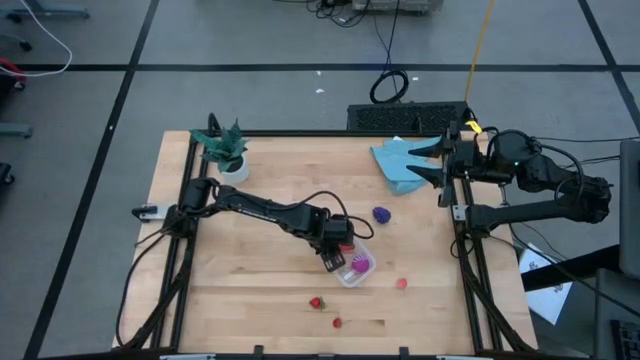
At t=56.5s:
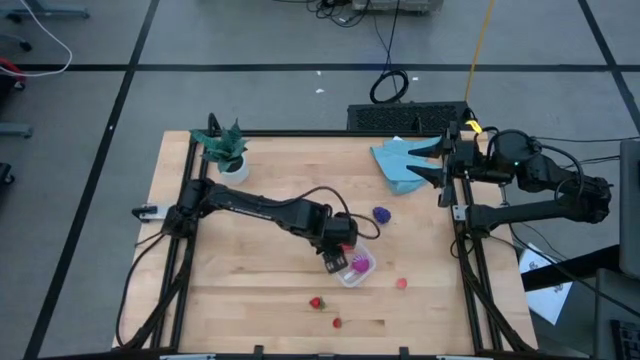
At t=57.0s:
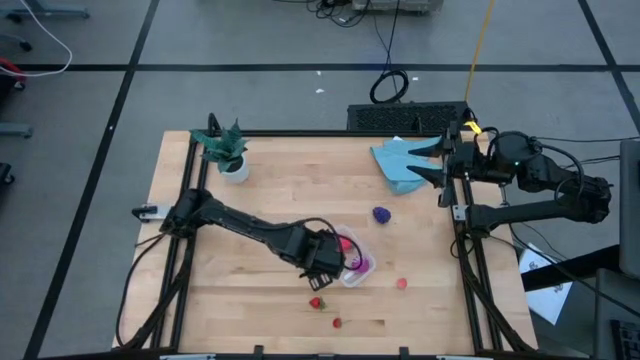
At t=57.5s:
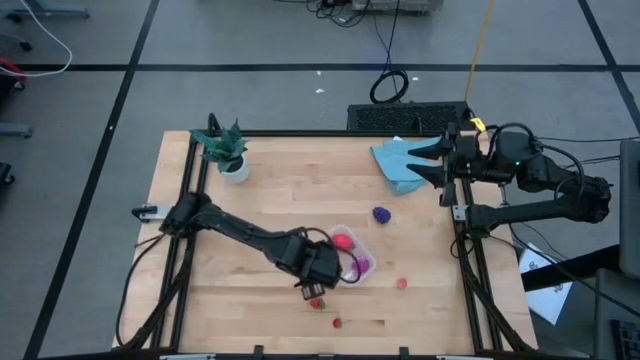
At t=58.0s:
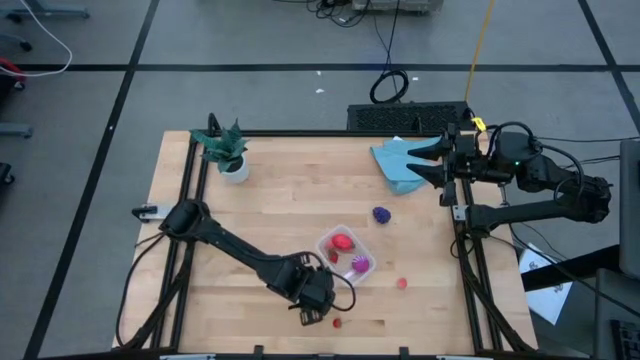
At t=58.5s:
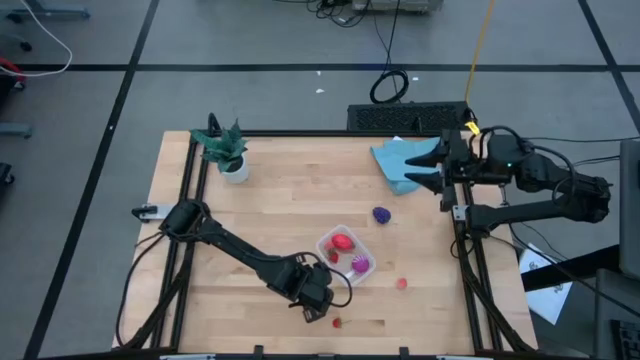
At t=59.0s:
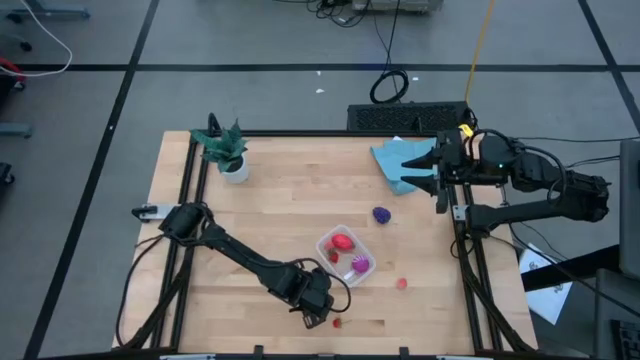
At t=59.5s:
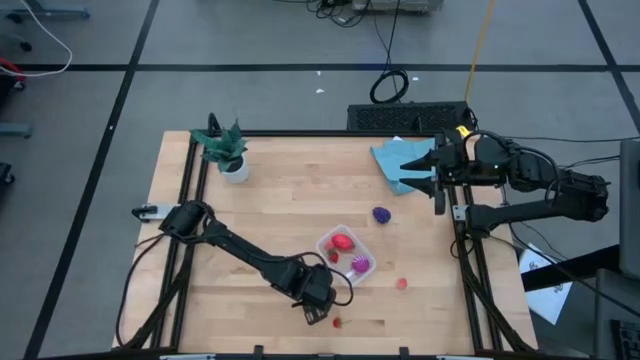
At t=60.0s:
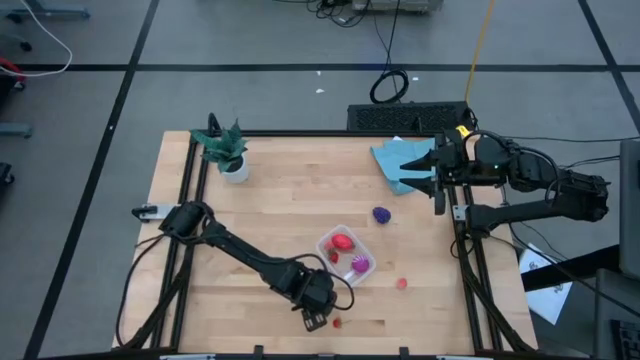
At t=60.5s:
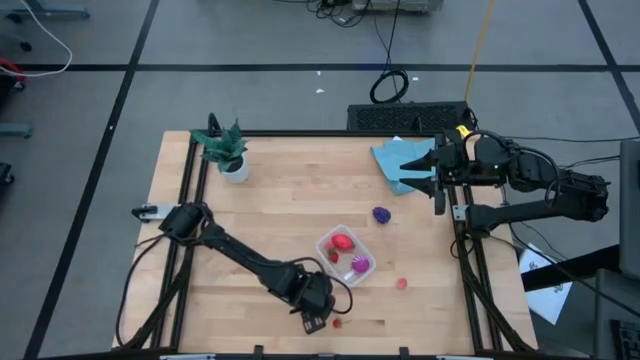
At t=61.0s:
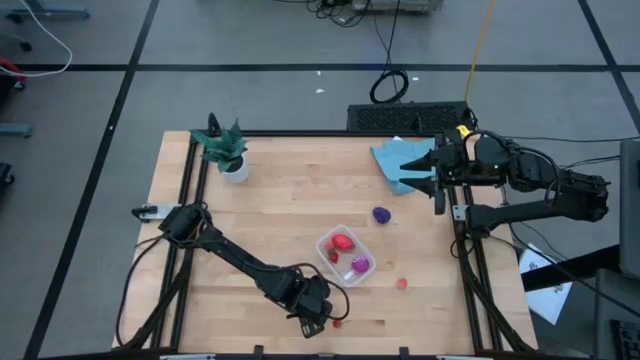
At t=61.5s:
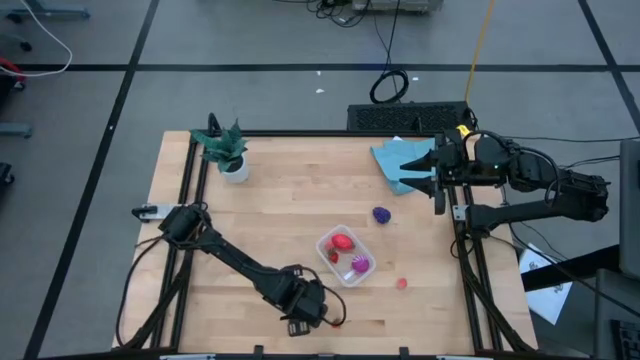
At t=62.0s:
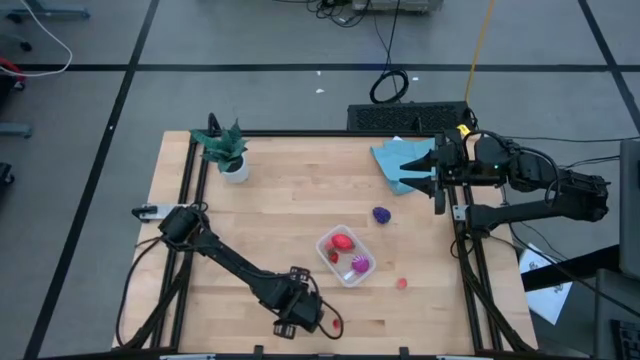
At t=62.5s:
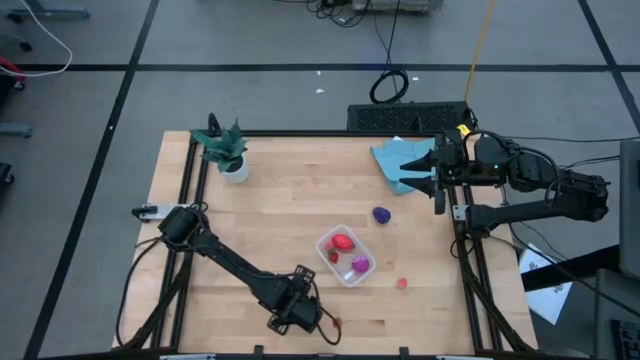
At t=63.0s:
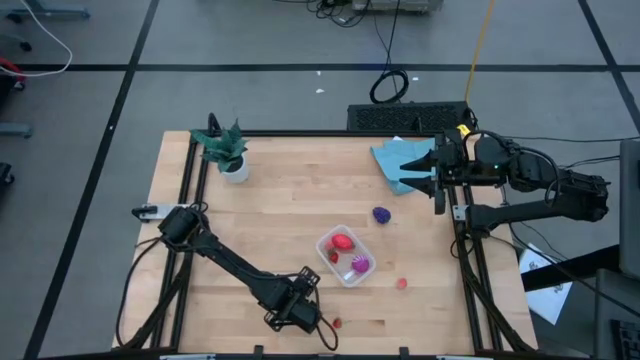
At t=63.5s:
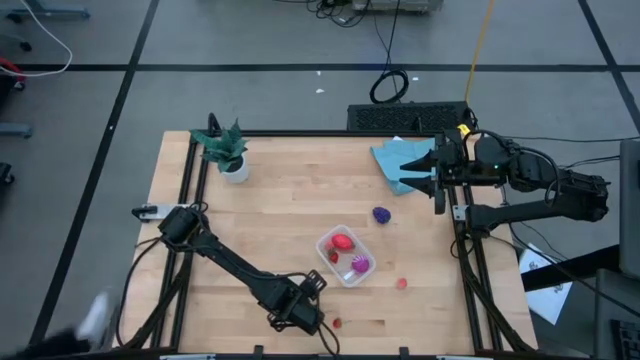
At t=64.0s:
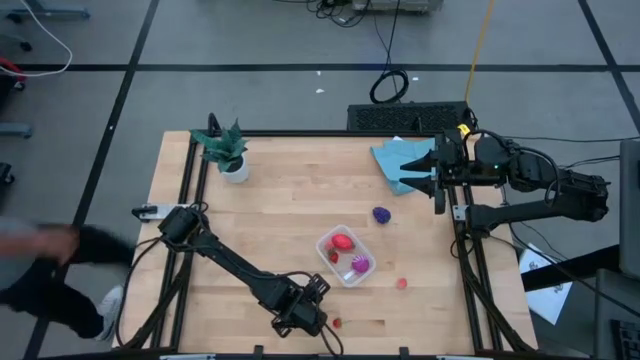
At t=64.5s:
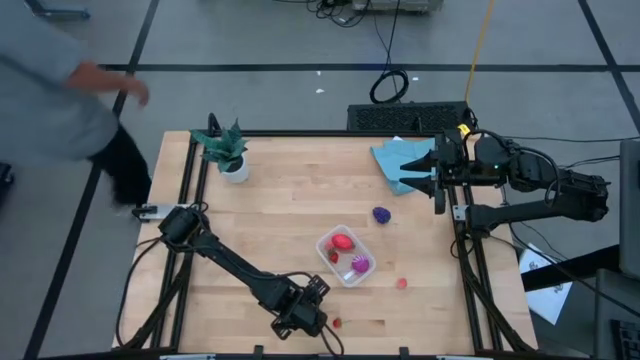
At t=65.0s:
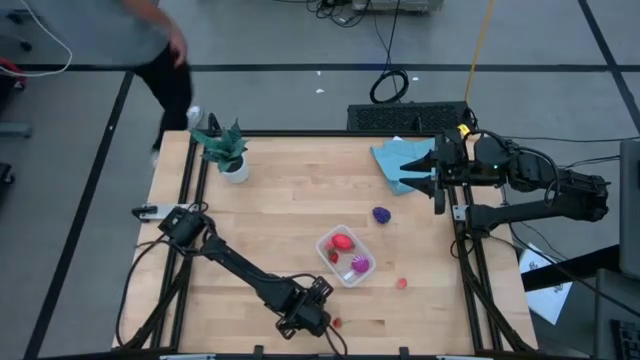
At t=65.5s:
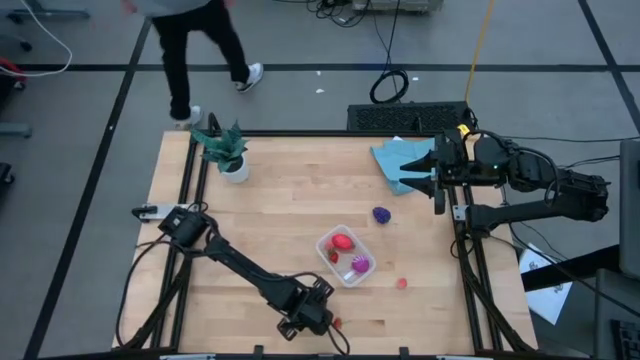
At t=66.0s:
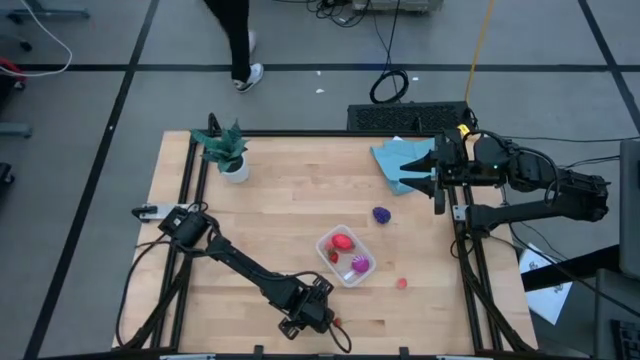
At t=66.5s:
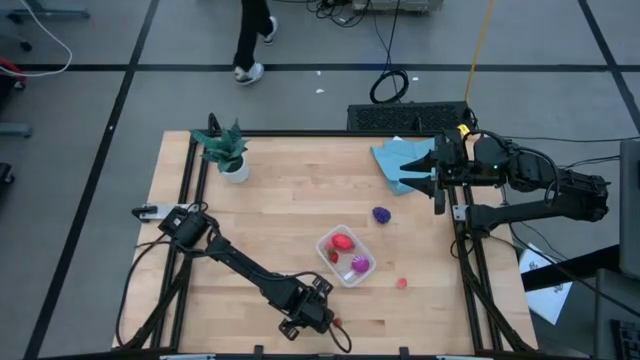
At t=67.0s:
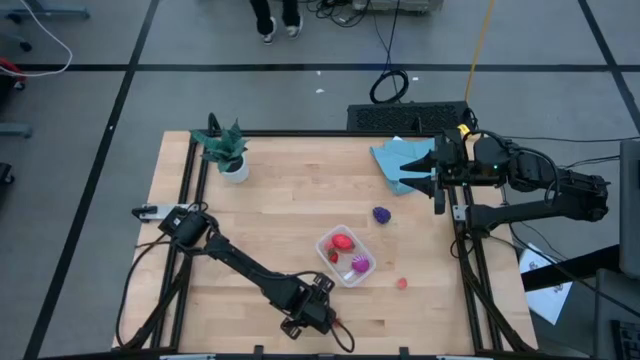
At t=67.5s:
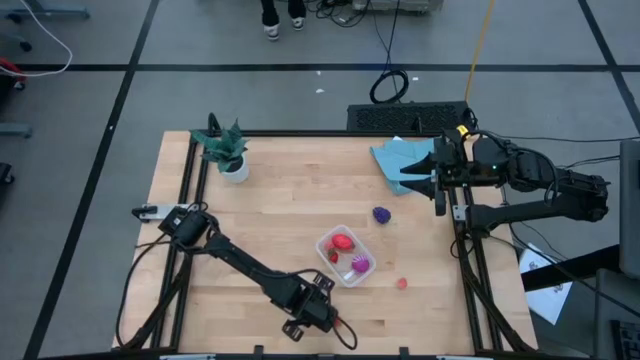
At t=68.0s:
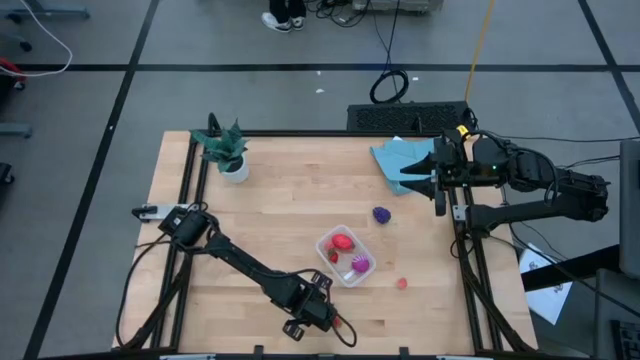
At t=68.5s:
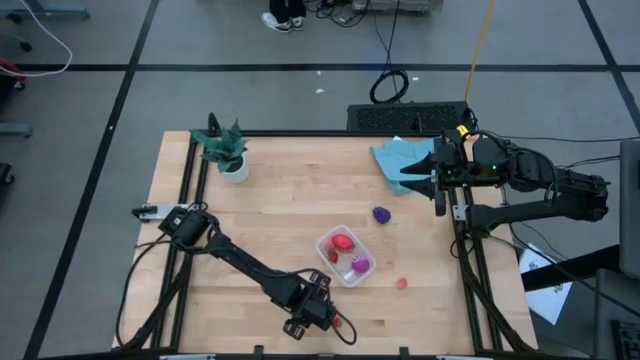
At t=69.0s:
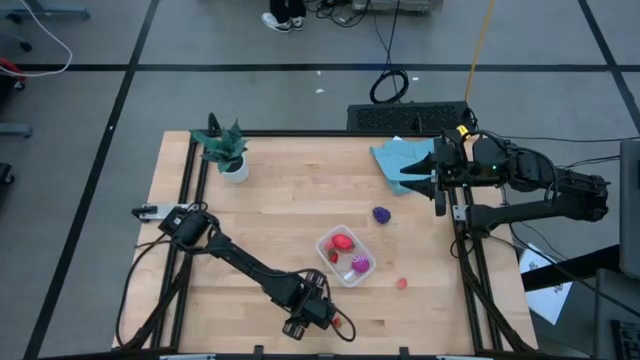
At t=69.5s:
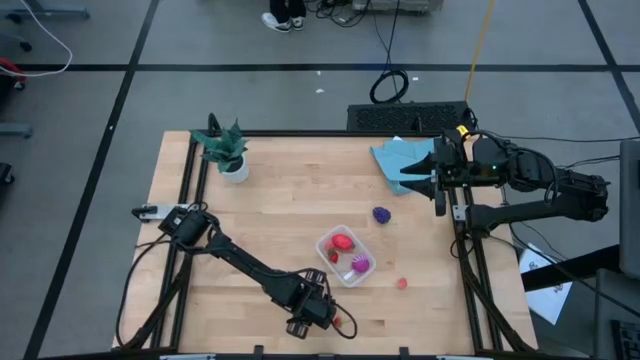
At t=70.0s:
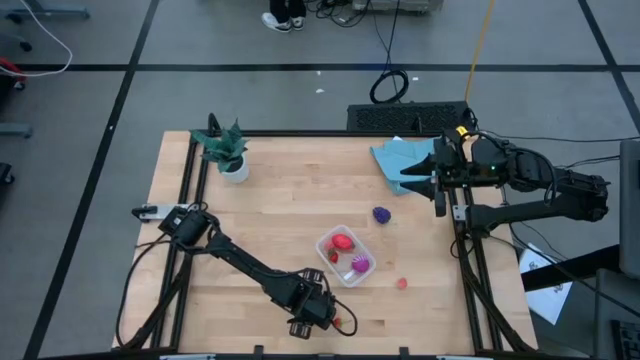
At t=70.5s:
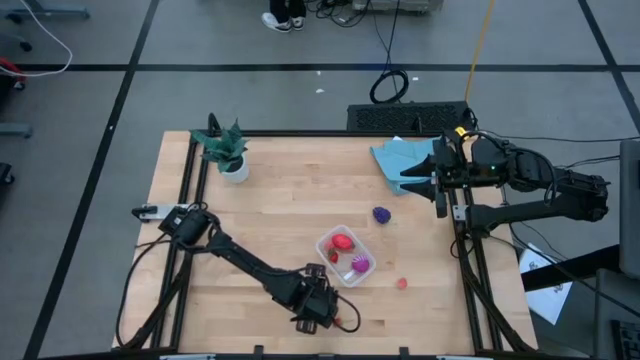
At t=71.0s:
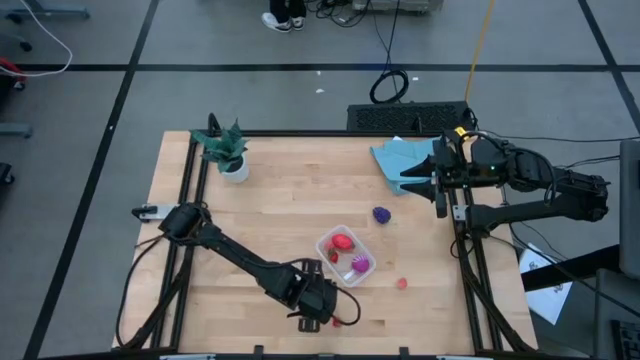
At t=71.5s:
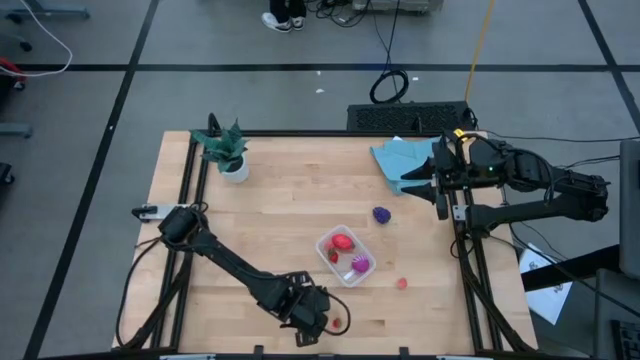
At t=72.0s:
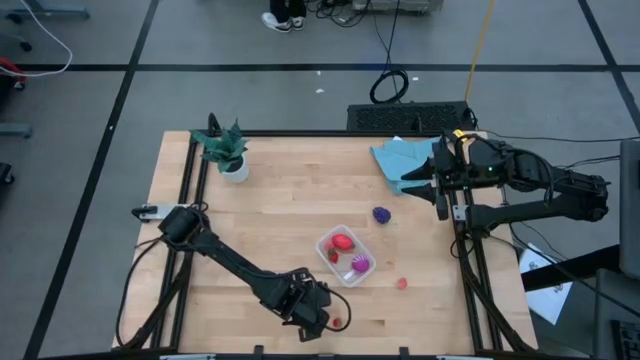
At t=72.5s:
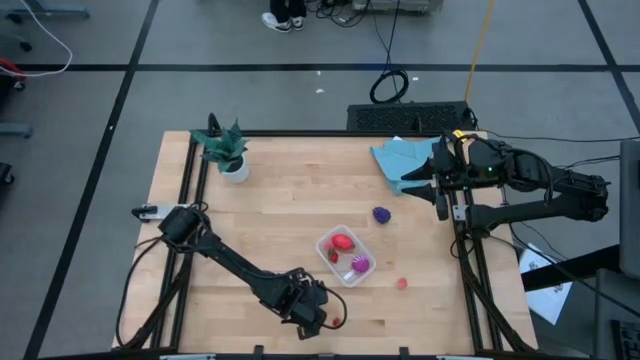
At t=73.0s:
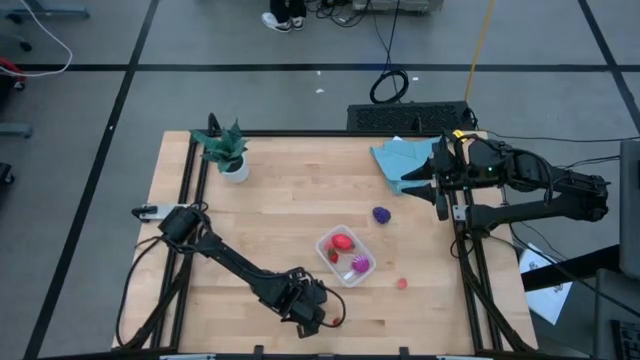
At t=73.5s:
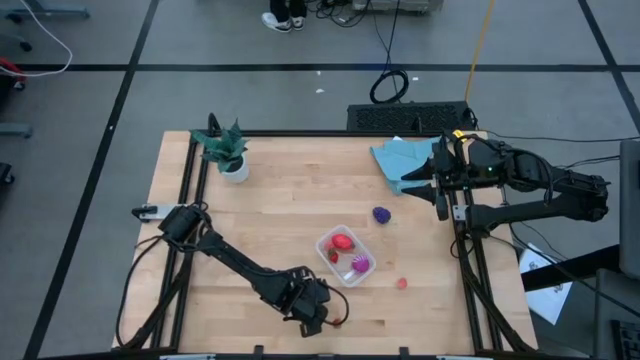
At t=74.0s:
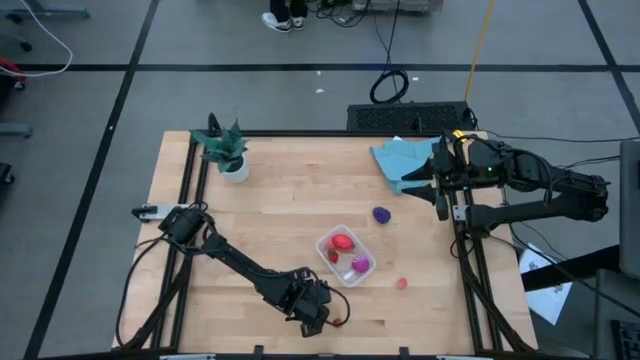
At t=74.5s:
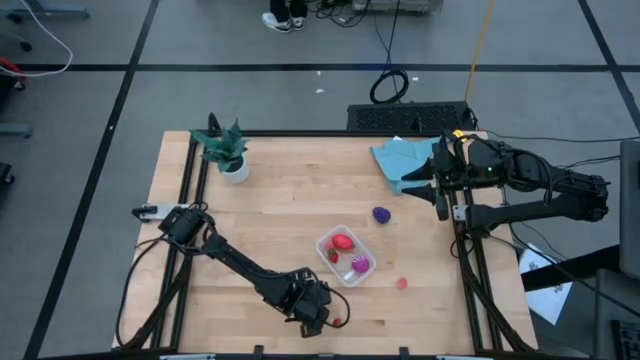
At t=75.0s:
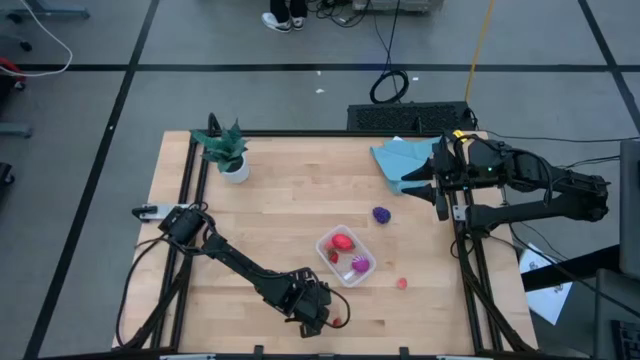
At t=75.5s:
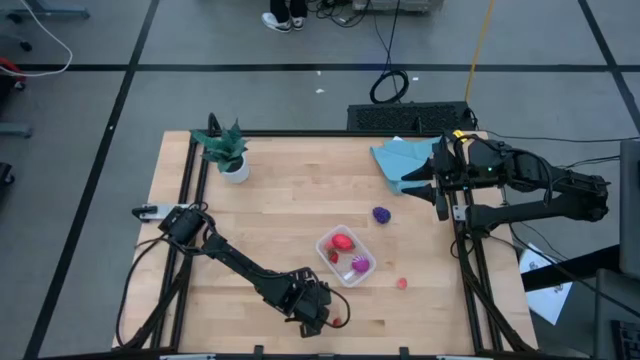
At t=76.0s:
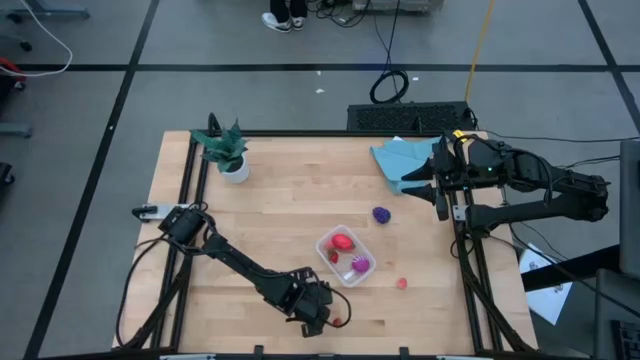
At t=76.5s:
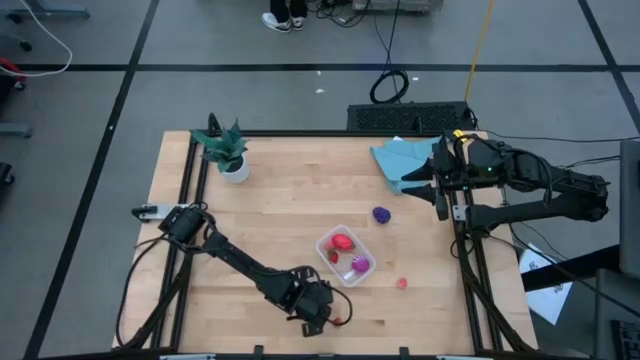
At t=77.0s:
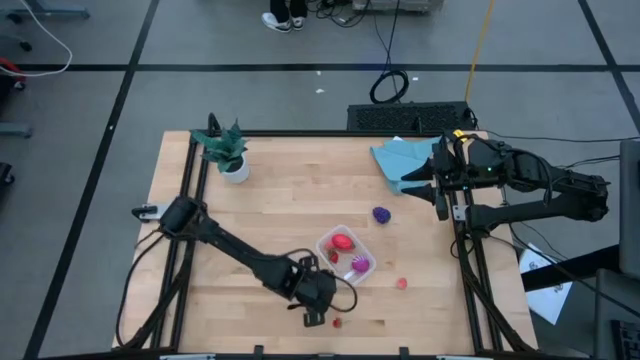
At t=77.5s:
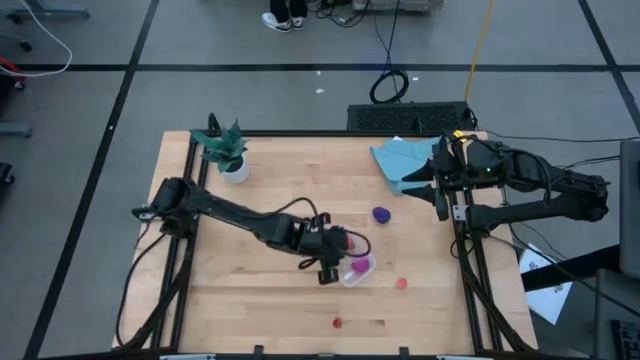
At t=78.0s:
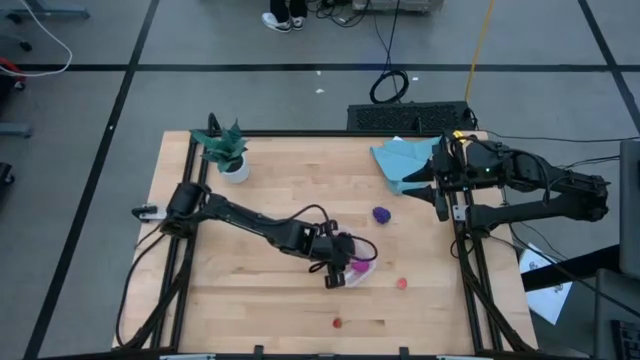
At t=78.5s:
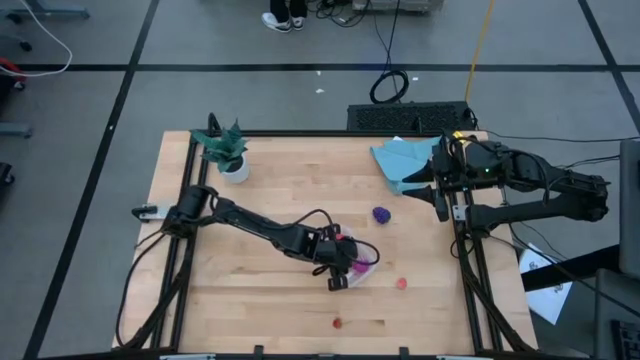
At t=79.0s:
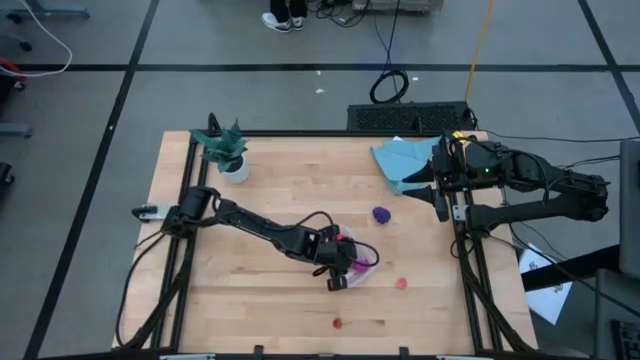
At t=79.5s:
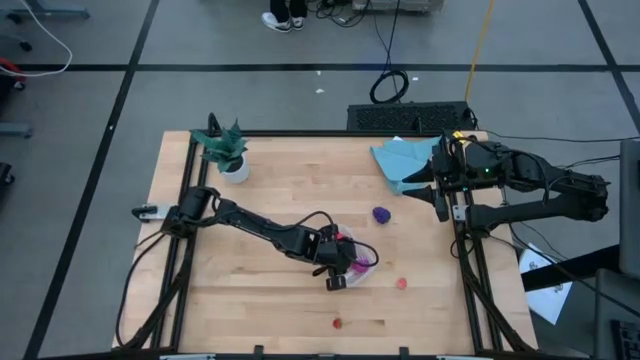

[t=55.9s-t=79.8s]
Task: Pick and placing Produce into tupperware
Put the top strawberry into the transparent container
